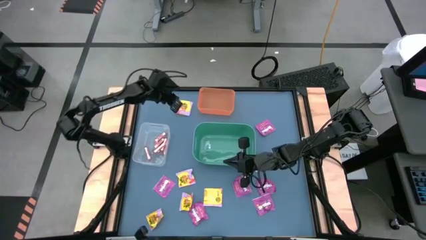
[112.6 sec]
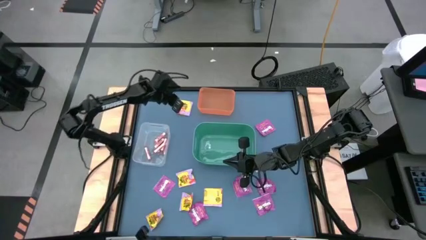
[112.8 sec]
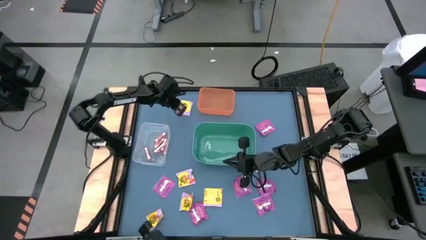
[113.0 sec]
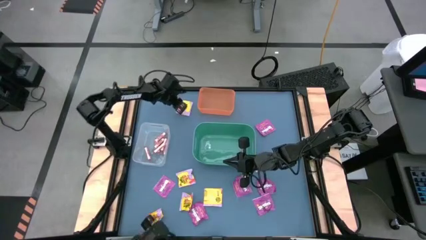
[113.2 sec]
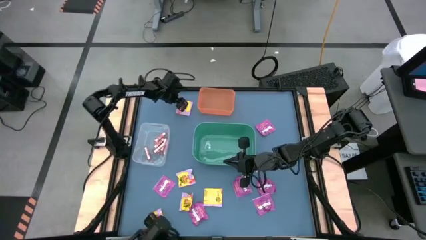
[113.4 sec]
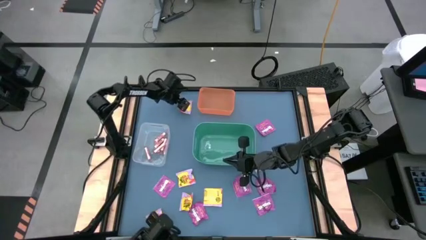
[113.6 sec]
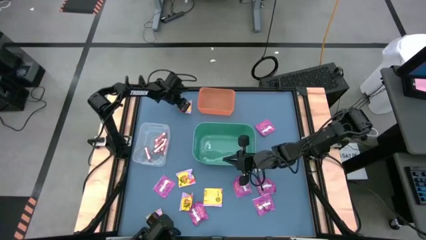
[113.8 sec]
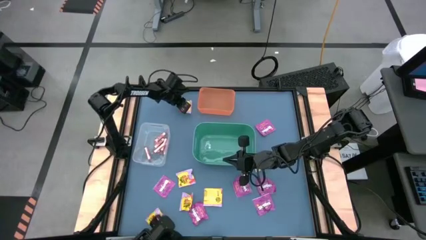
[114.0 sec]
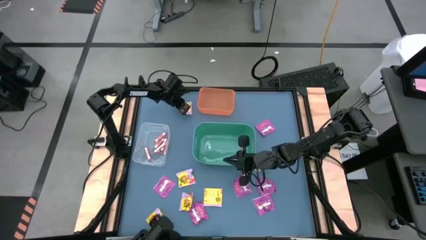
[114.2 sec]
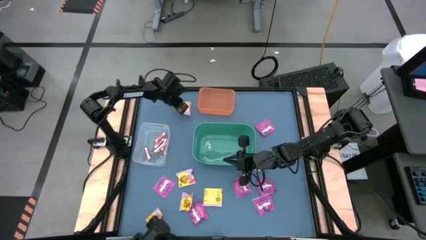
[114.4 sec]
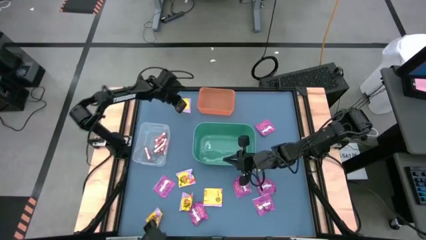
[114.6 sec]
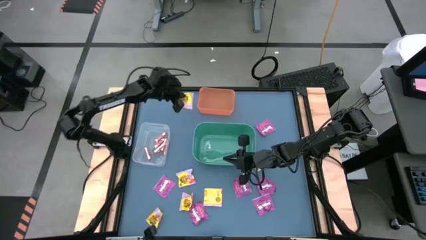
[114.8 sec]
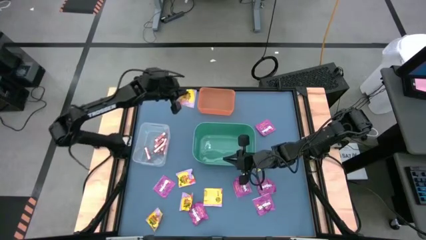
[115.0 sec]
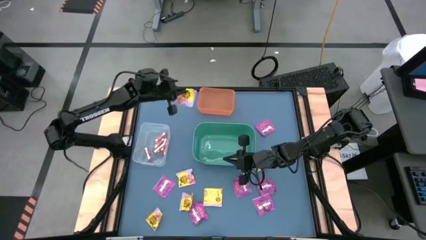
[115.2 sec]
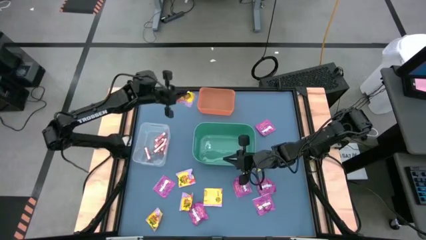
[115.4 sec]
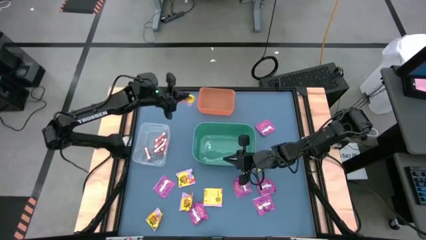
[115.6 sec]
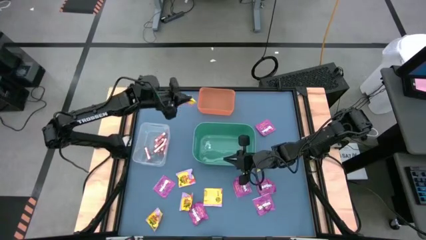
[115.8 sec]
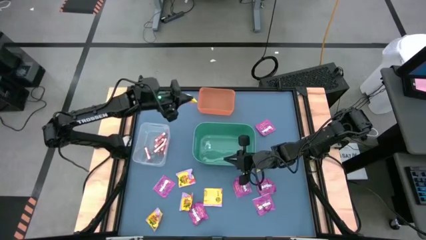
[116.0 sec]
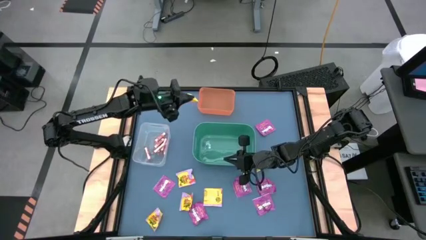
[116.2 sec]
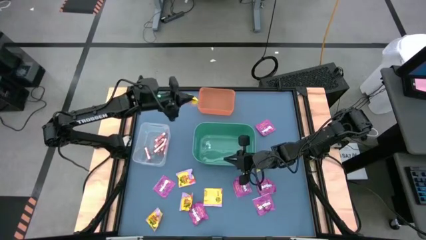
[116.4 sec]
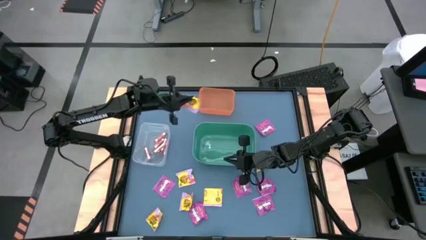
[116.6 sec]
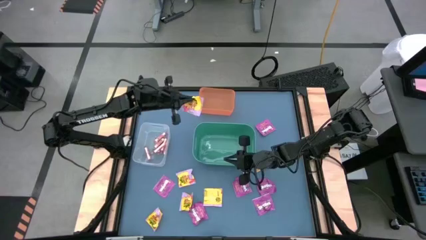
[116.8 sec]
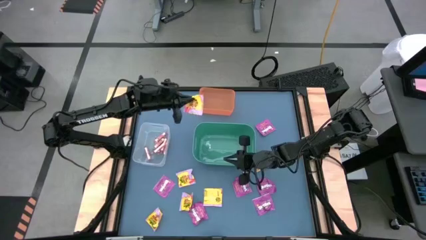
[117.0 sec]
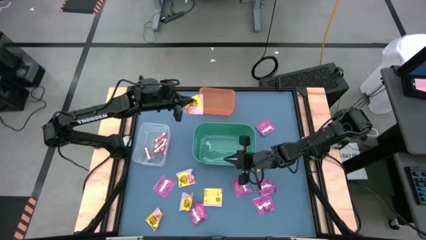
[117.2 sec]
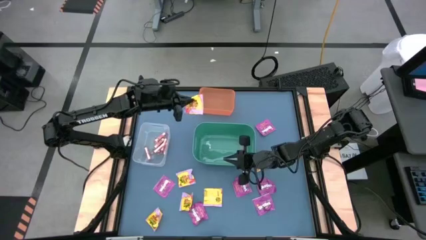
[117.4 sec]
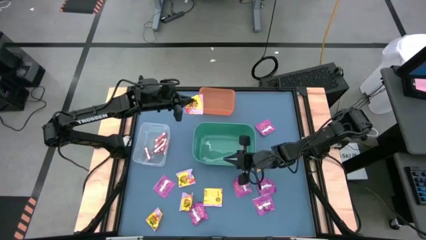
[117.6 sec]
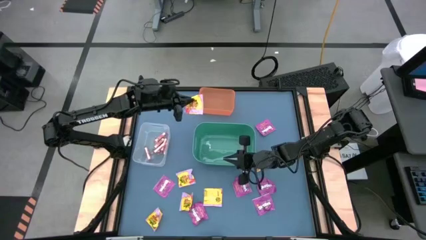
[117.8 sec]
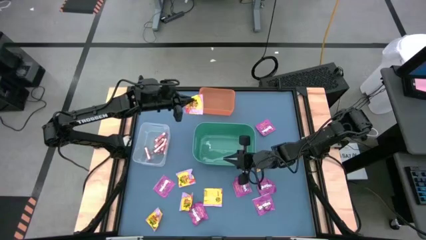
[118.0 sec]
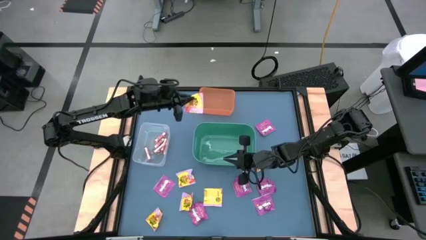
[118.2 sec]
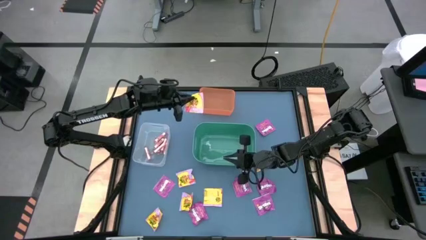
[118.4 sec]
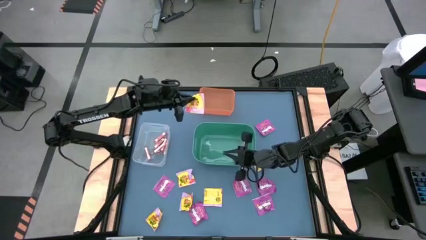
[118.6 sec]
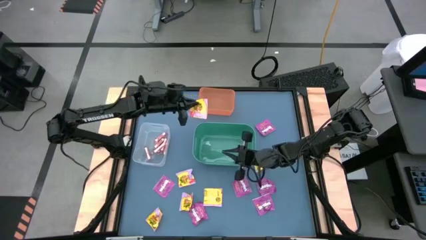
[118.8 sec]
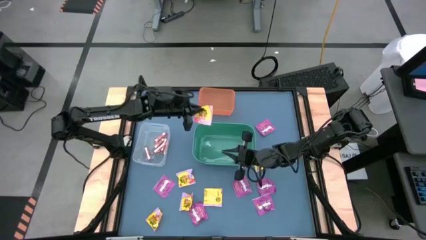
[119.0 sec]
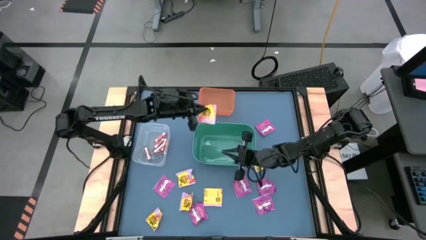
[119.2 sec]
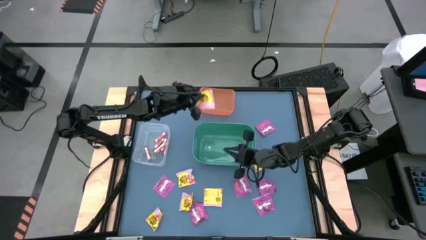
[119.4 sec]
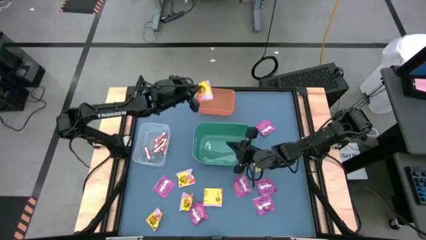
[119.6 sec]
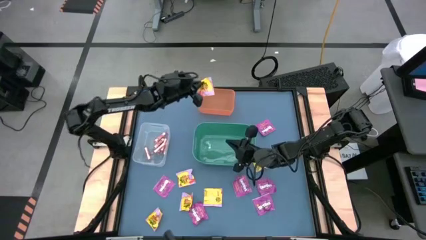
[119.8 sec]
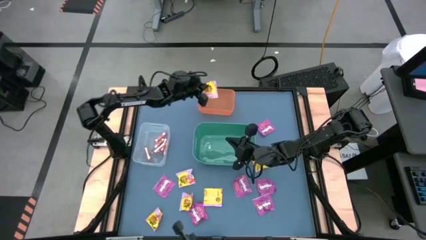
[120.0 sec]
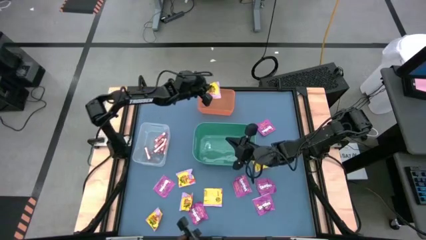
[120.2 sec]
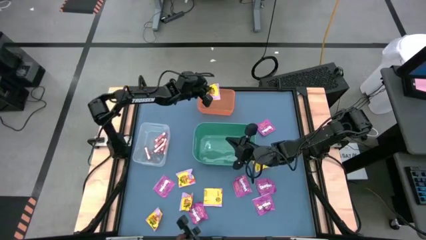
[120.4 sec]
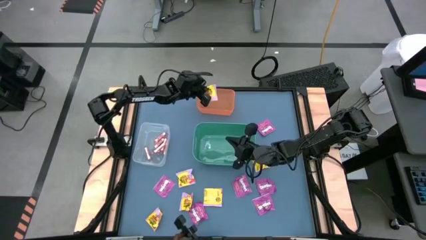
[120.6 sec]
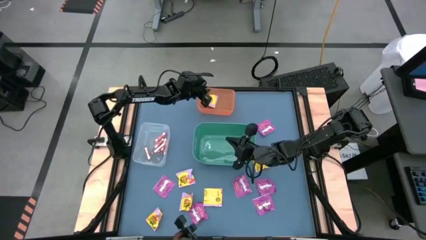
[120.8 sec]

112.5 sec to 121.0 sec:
Task: Sort candy
Put the yellow candy into the orange bin

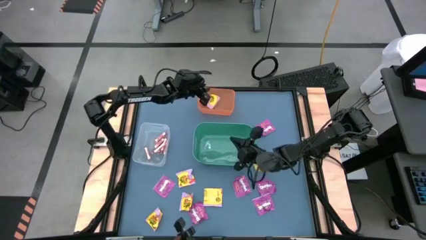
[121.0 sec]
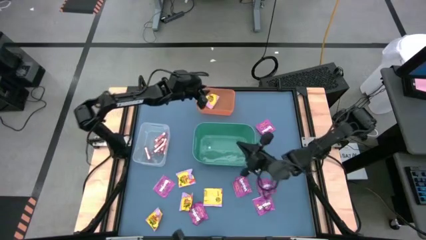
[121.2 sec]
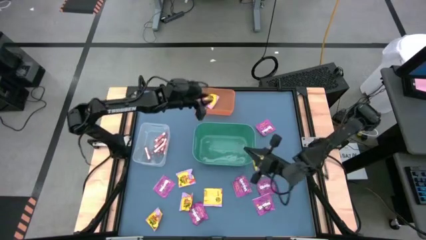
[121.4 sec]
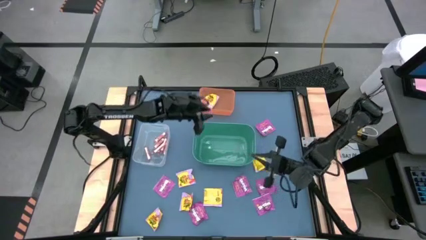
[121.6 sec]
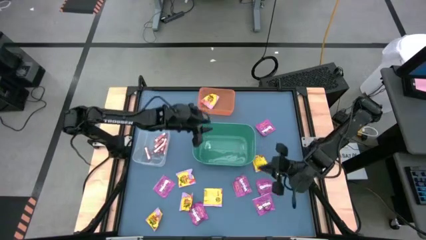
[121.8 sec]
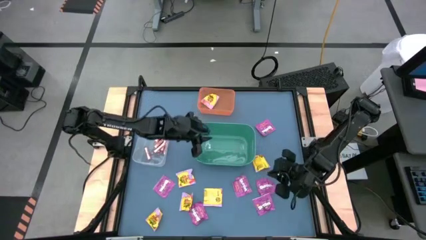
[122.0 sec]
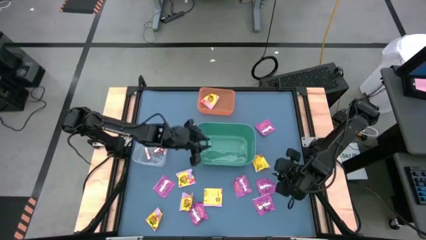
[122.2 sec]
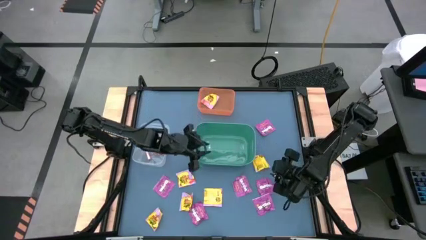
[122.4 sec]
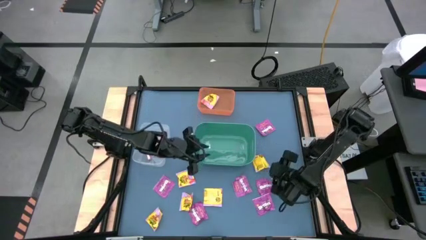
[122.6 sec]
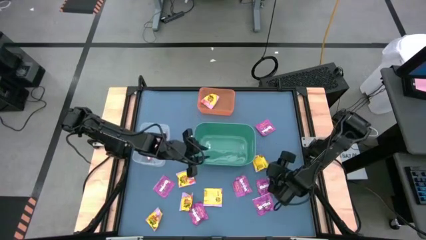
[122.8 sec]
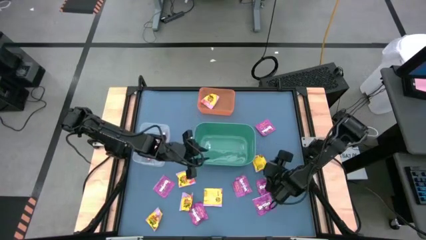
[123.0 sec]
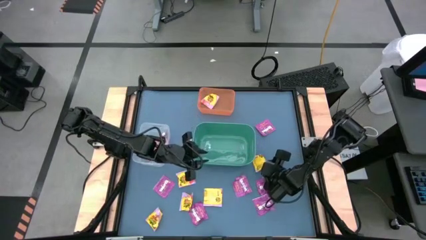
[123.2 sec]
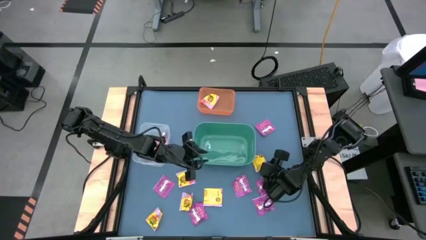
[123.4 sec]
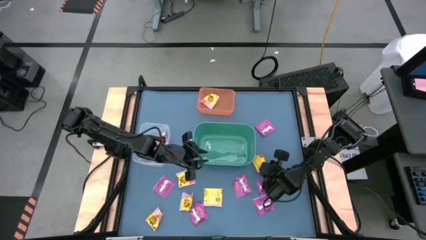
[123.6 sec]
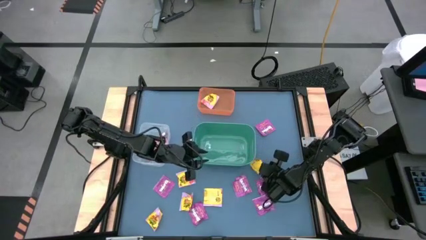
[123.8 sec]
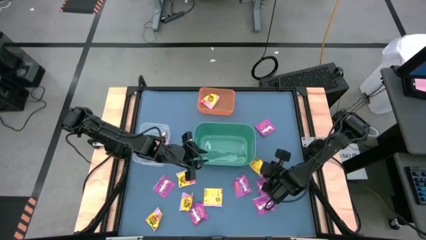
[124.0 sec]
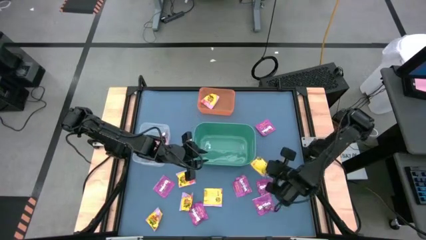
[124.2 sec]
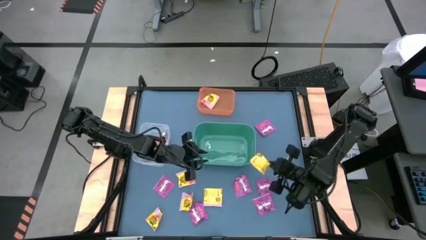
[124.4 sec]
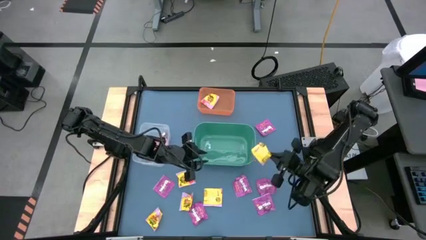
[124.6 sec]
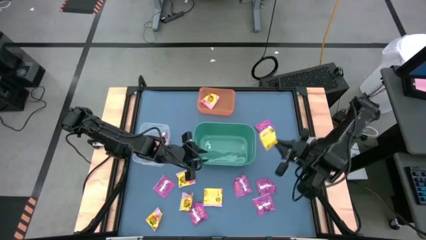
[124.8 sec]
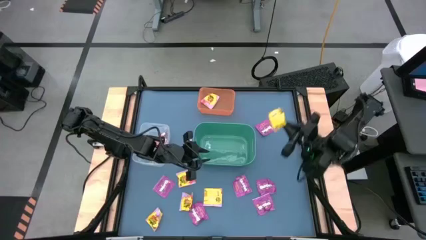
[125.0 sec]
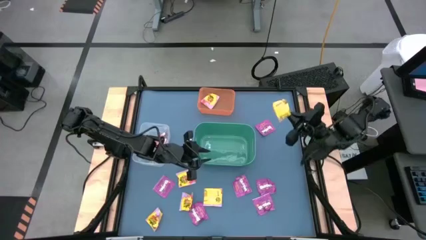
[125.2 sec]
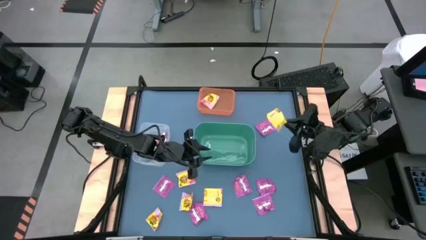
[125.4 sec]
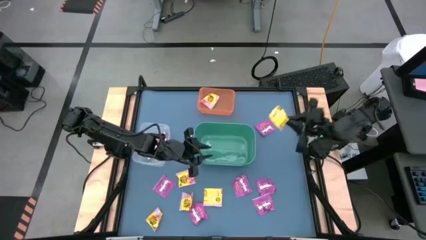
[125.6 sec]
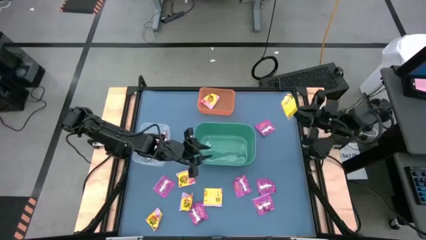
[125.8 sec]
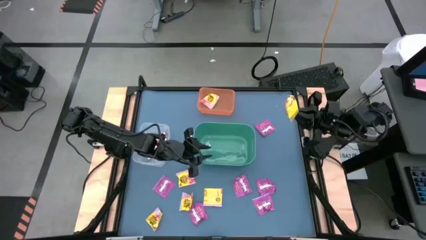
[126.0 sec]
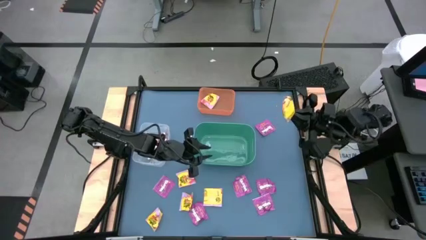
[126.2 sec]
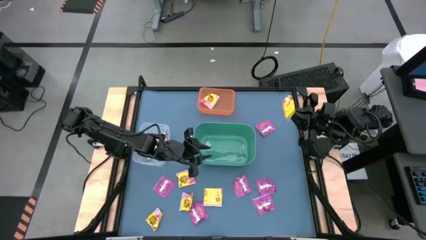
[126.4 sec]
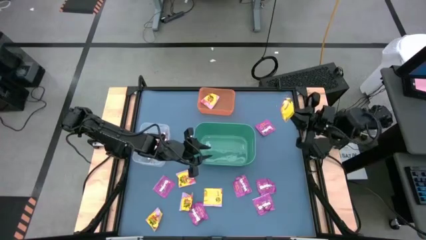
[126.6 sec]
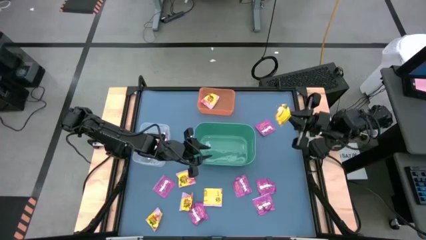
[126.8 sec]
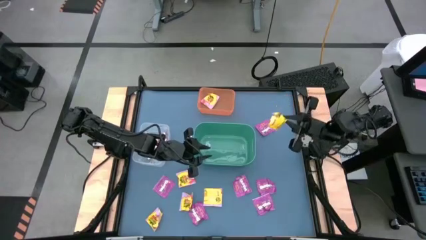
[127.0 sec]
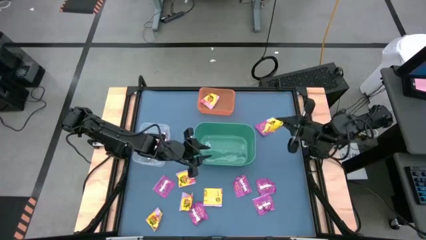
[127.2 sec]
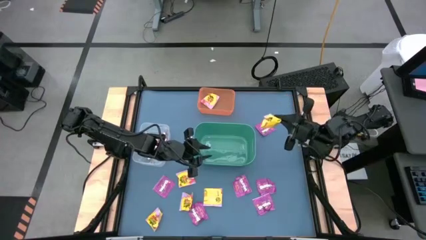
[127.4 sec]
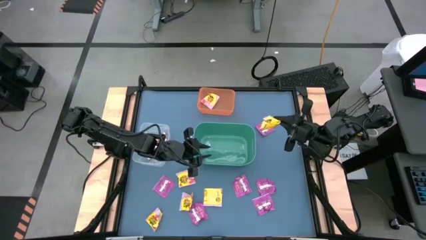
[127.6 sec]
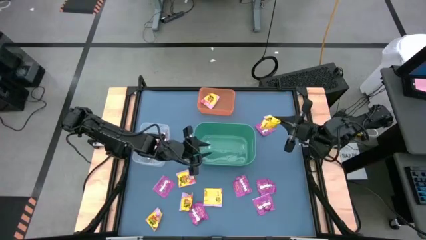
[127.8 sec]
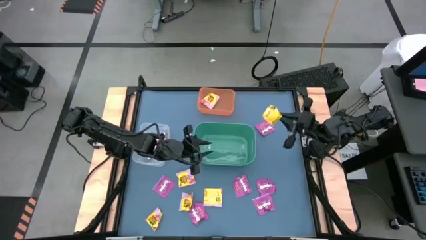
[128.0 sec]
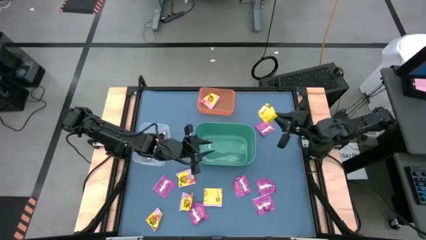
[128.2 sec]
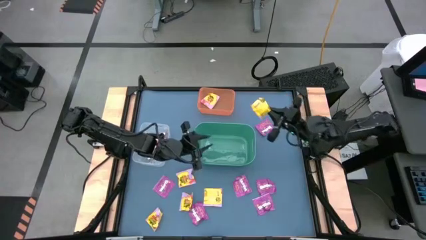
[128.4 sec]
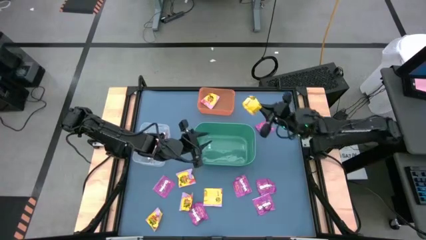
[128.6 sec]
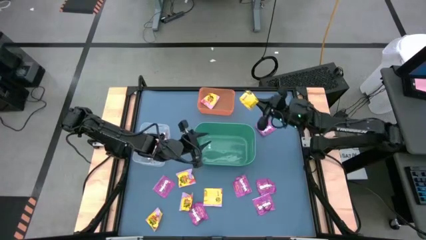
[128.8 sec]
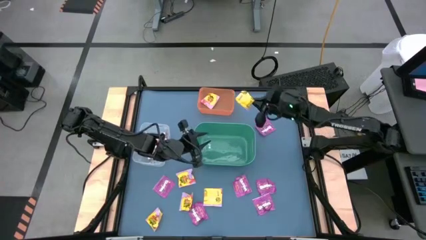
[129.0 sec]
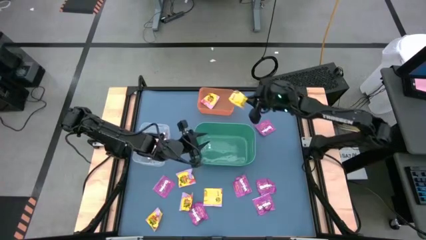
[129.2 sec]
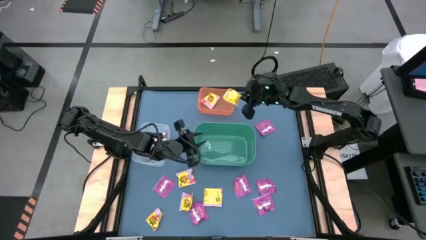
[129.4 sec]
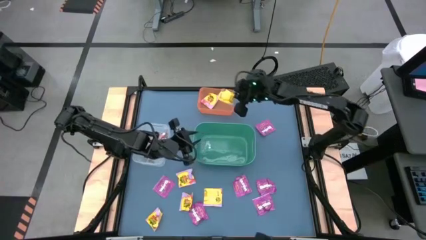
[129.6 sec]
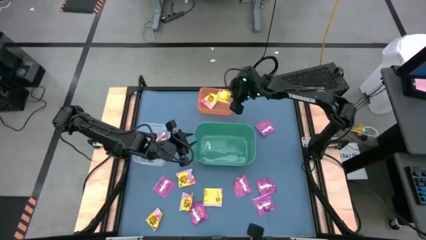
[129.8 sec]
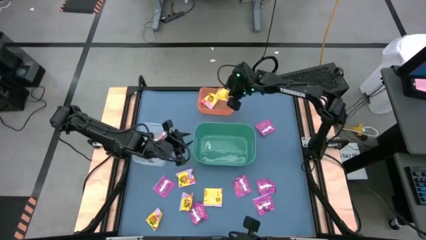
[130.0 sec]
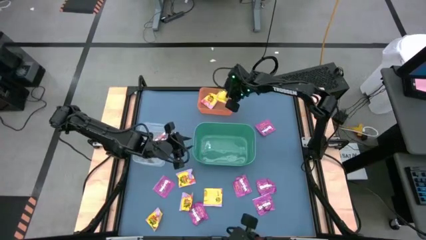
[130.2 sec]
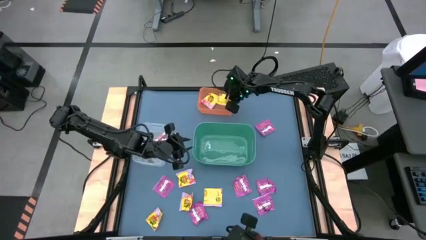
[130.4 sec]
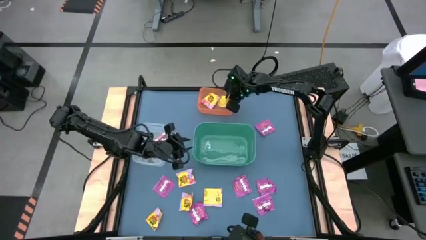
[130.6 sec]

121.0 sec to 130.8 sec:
Put the yellow candy into the orange bin
